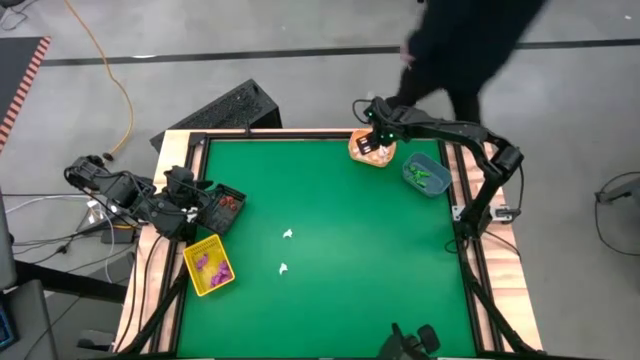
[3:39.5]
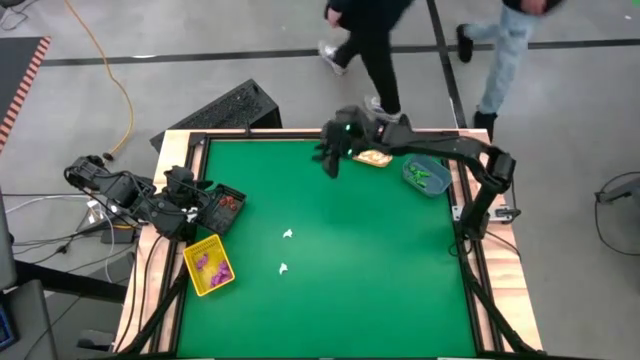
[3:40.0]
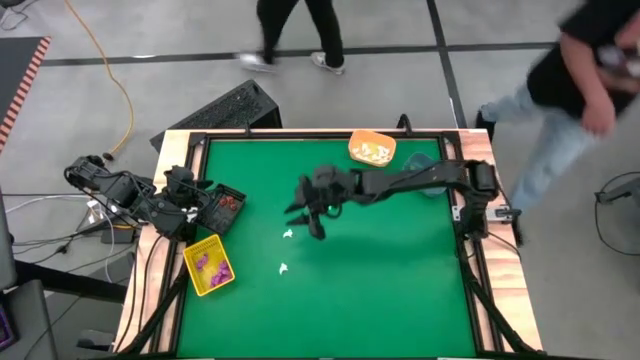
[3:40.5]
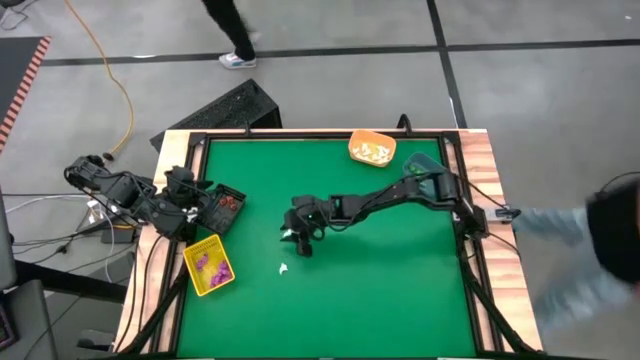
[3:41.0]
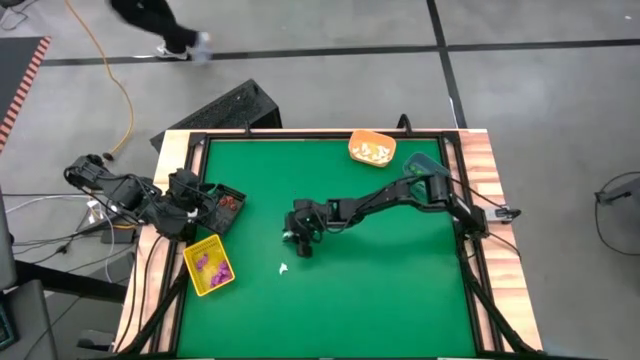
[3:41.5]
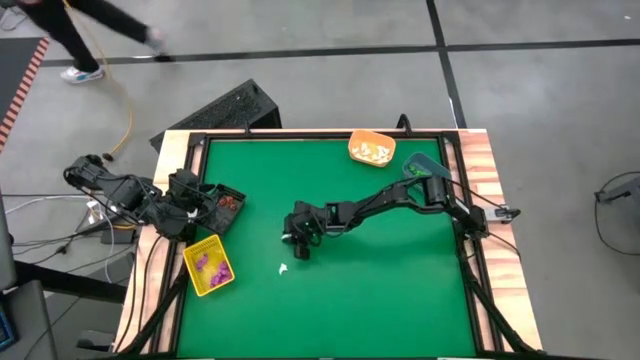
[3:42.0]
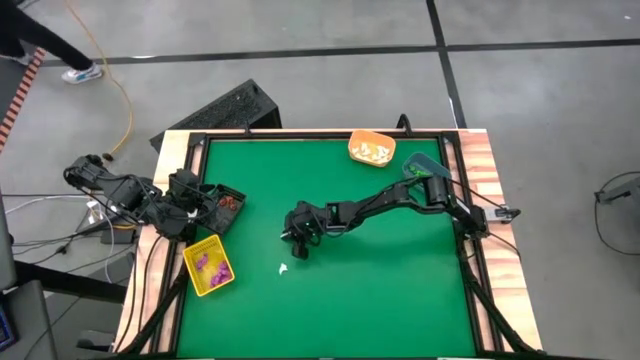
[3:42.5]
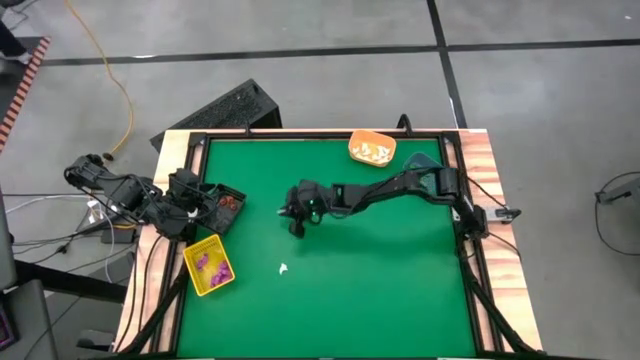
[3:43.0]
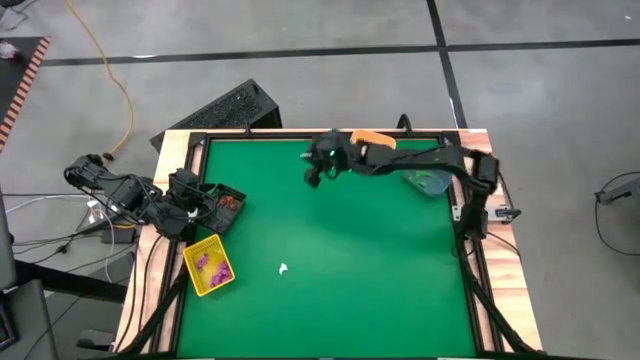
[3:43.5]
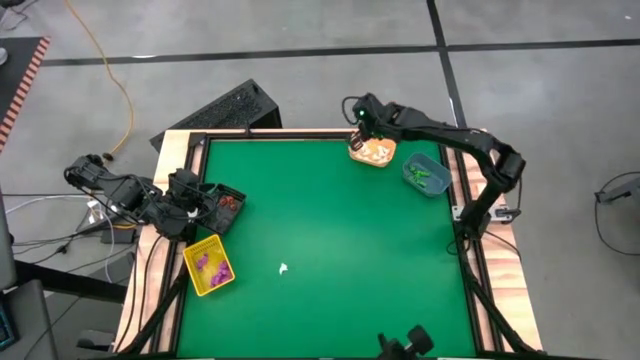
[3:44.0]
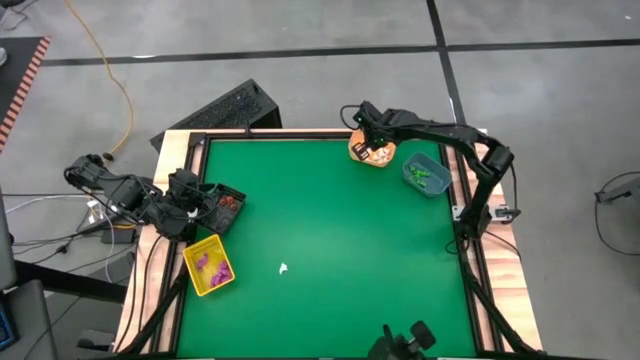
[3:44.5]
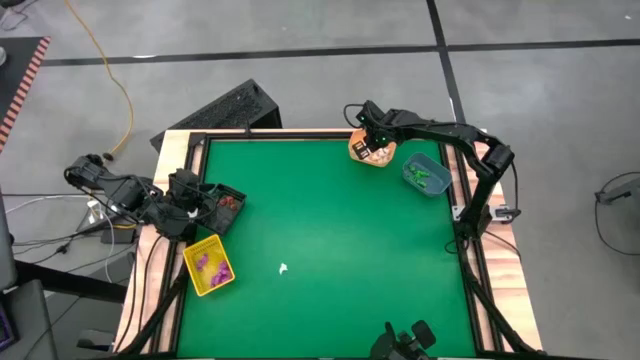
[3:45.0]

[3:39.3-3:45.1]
Task: Sort Halloween decoration
Put the white ghost toy into the light orange bin

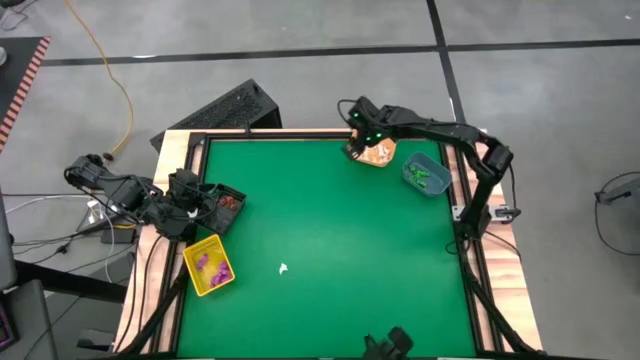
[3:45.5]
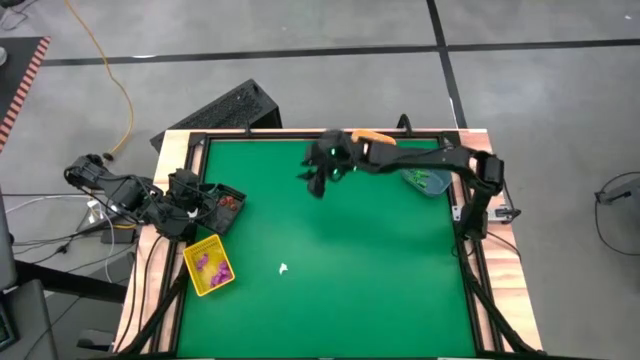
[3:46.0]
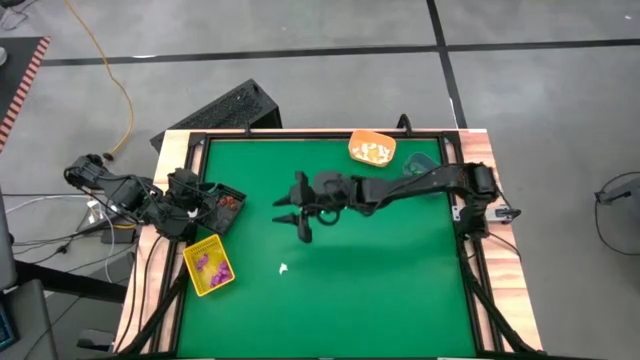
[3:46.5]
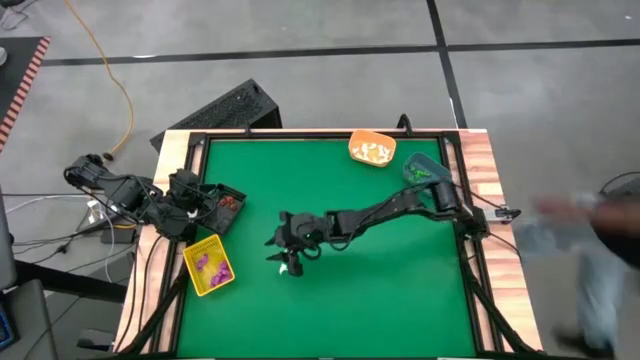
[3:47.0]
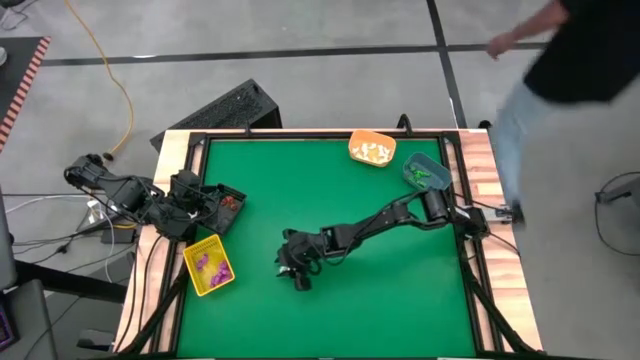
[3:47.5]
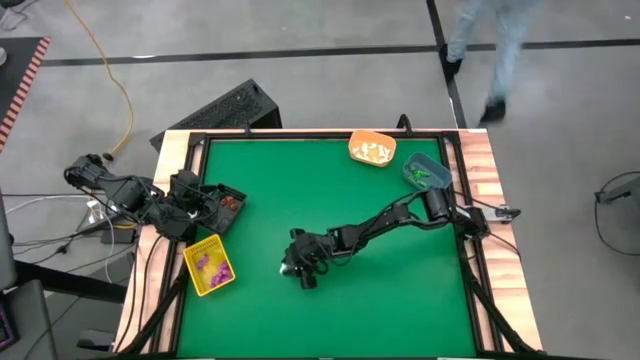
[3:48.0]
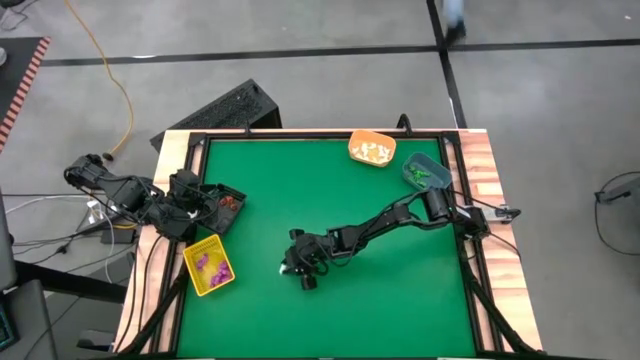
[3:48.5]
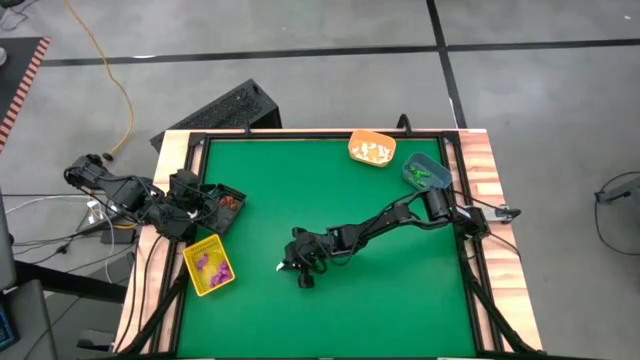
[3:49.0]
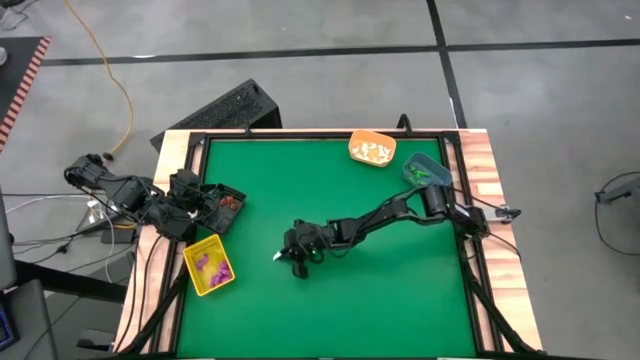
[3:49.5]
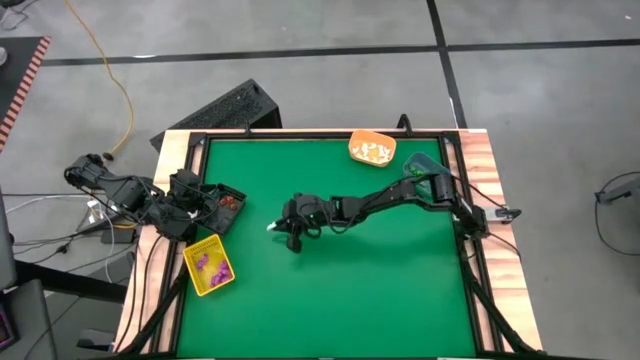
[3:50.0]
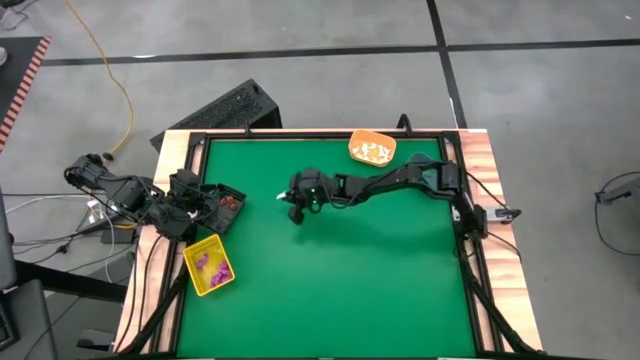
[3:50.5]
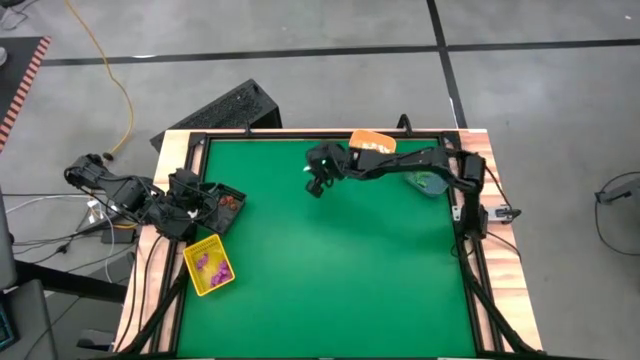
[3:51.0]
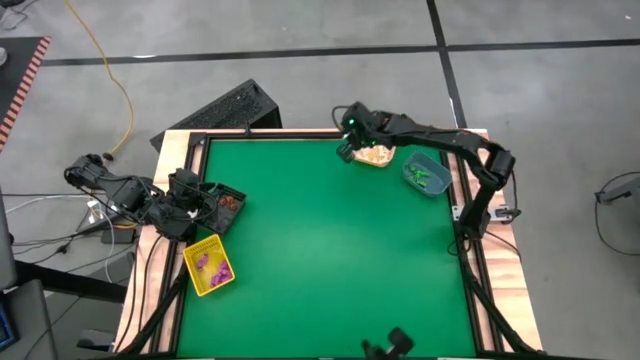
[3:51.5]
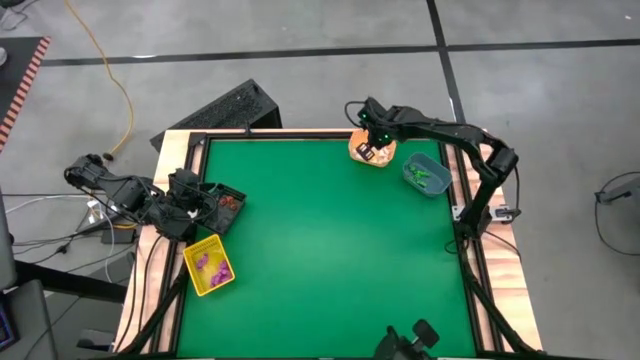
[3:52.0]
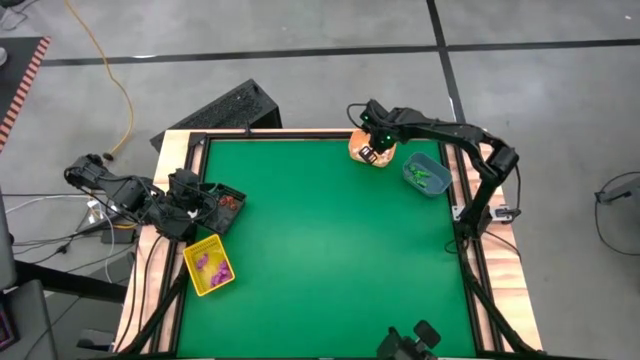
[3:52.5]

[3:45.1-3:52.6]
Put the white ghost toy into the light orange bin

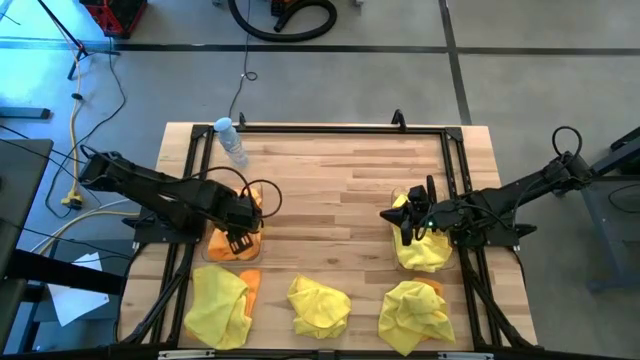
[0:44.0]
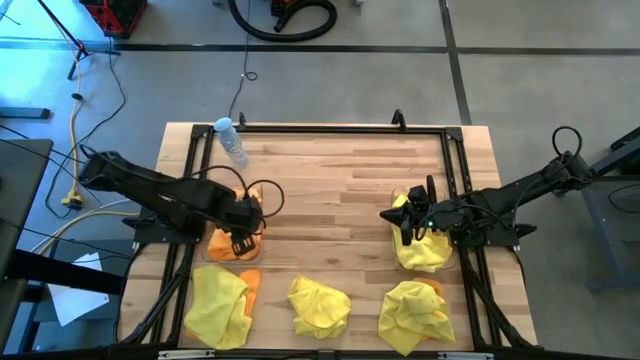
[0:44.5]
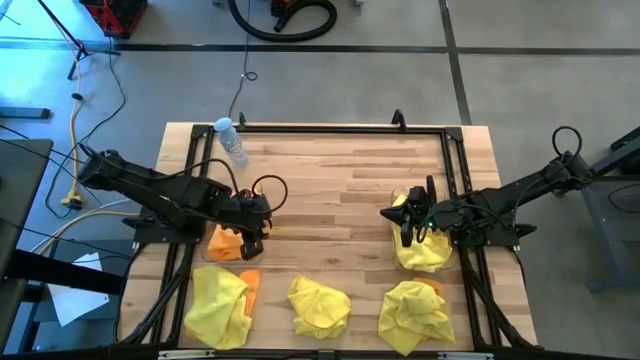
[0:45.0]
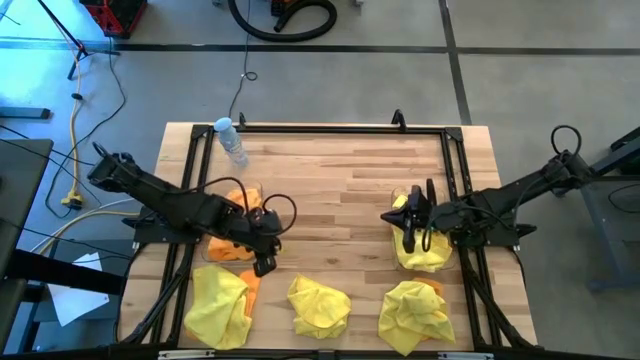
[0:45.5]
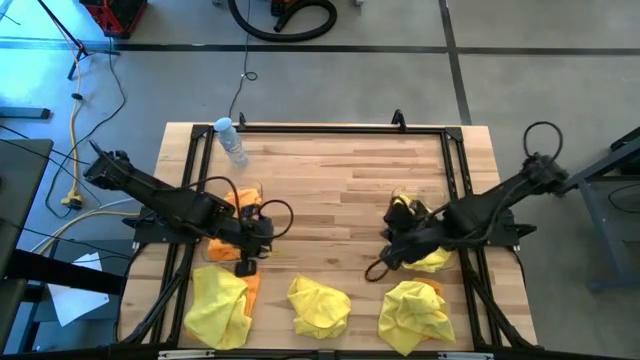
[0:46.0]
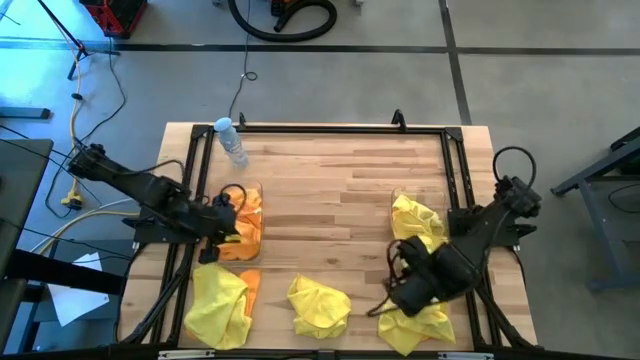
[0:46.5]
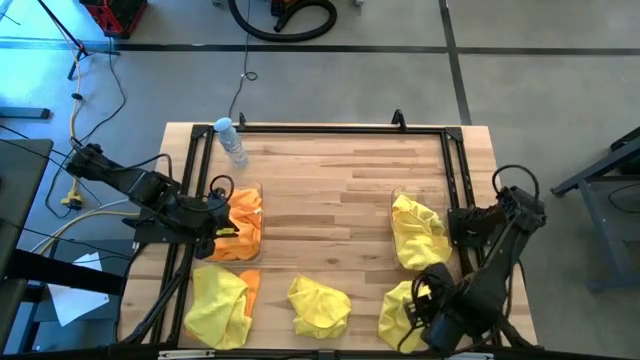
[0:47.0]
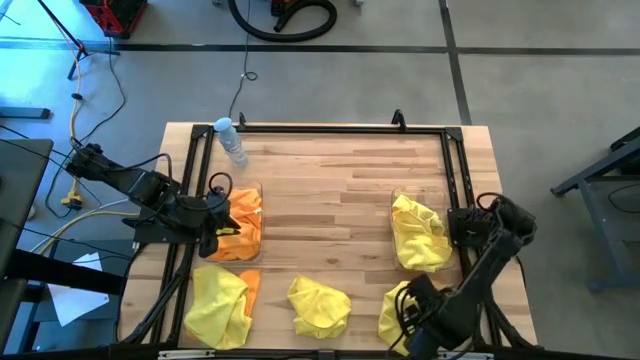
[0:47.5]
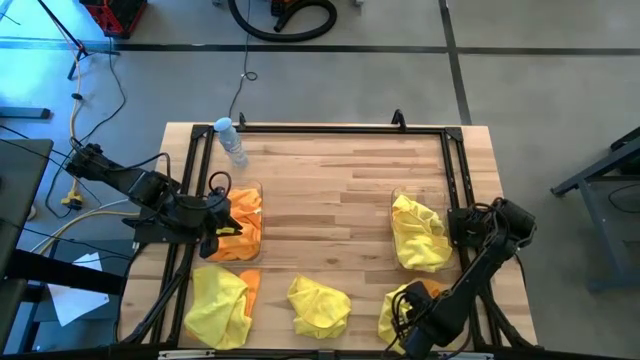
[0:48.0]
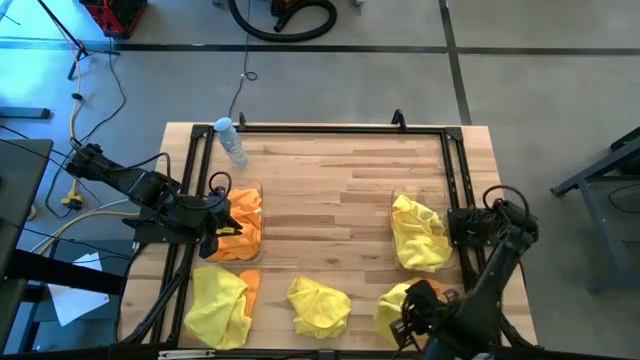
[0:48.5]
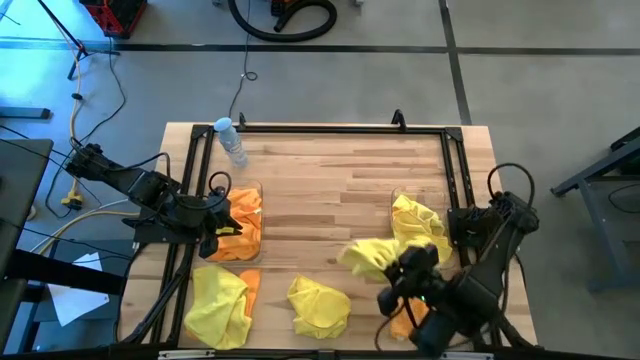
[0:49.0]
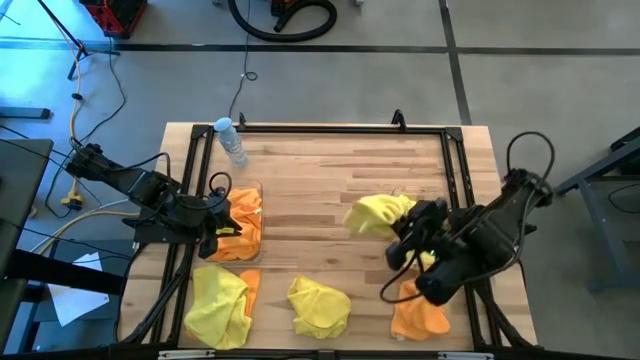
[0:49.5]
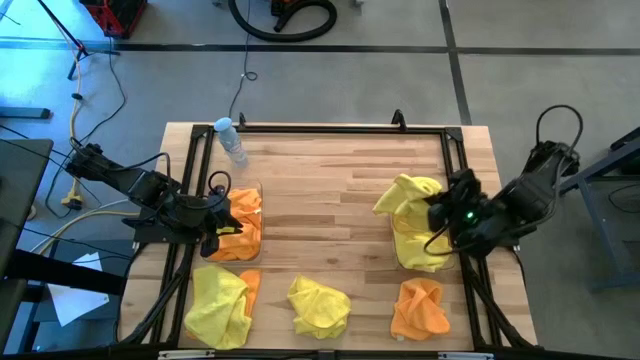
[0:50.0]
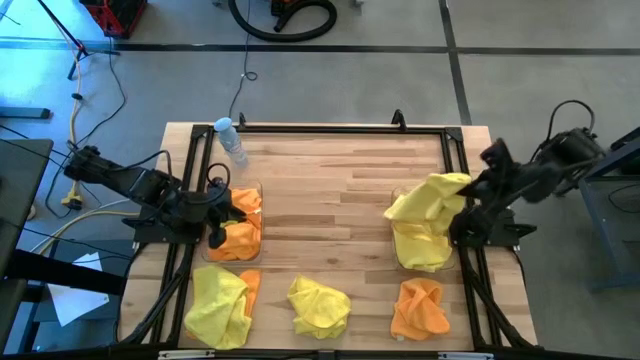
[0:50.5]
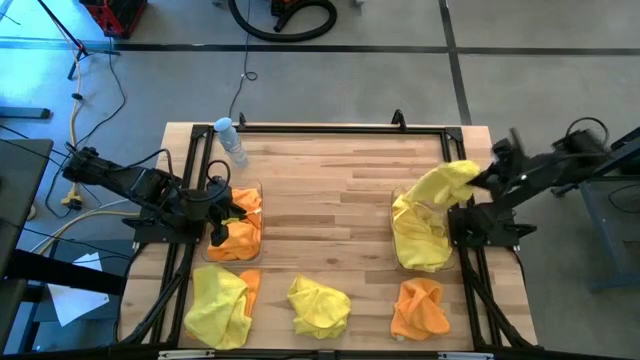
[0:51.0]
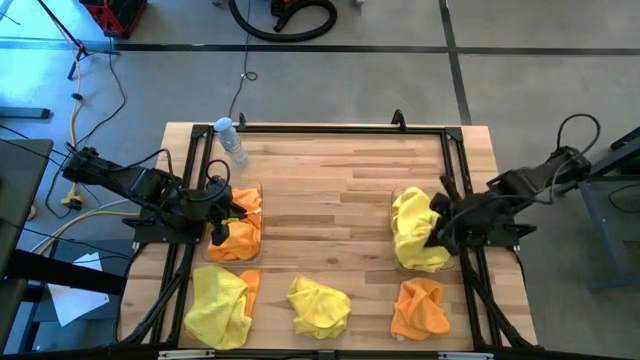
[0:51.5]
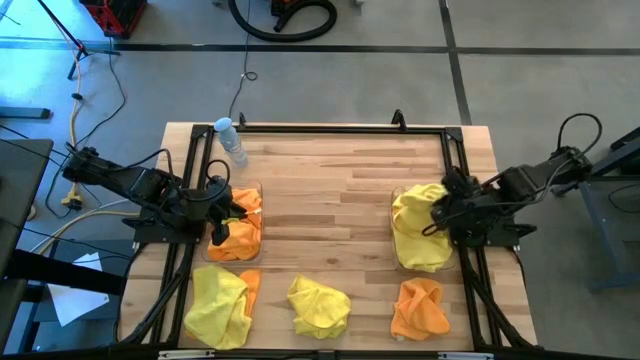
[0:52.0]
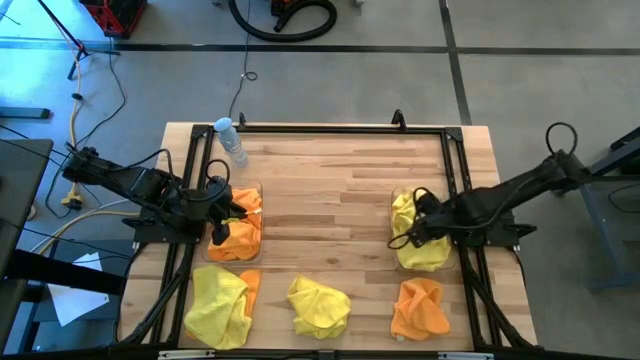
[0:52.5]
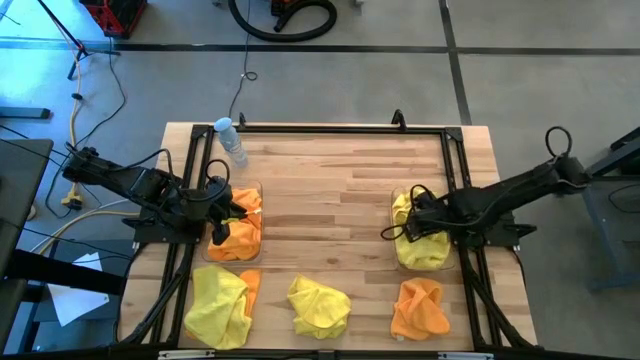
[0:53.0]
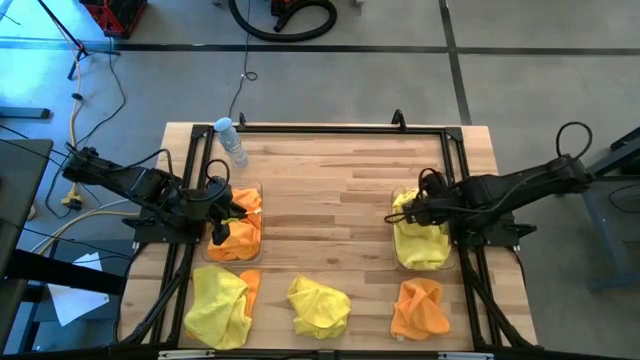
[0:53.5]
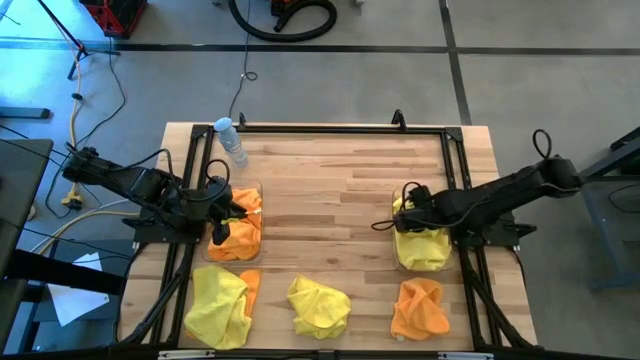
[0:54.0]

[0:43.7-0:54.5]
Task: Sort microfiber towel by color & place in baskets
Put the yellow towel into the right transparent bin
